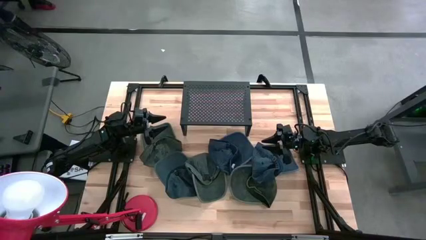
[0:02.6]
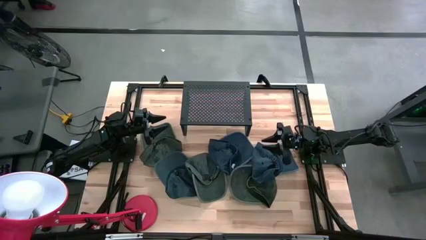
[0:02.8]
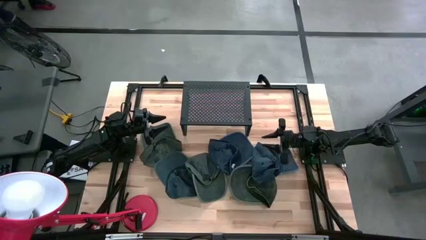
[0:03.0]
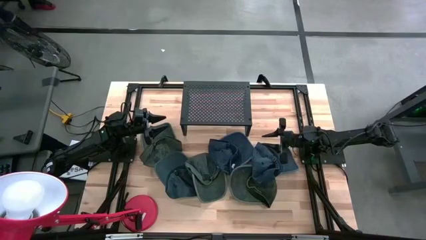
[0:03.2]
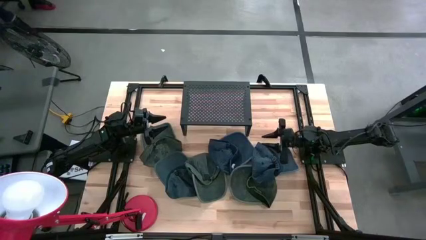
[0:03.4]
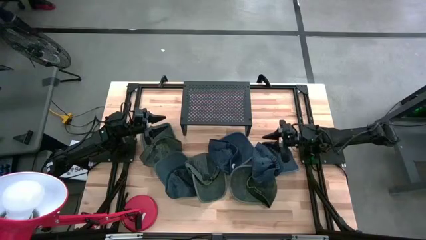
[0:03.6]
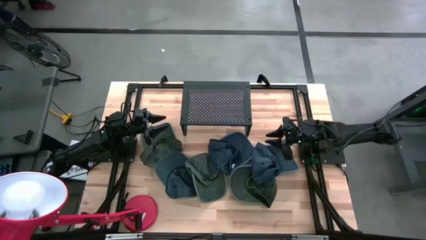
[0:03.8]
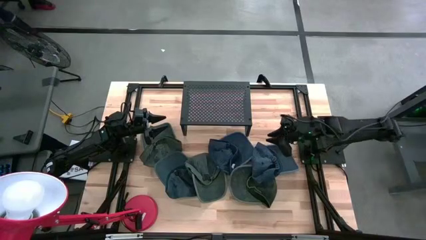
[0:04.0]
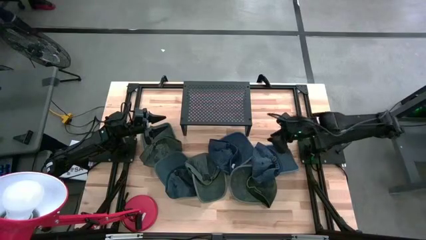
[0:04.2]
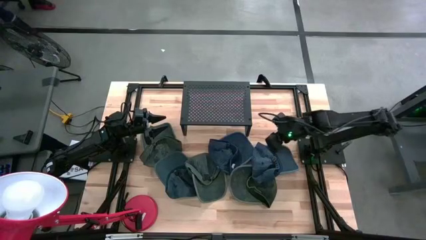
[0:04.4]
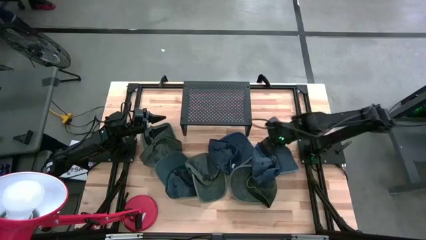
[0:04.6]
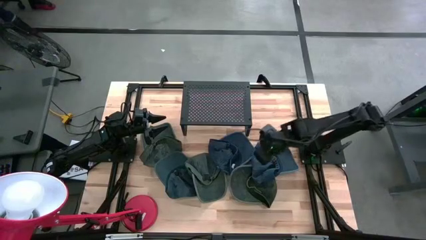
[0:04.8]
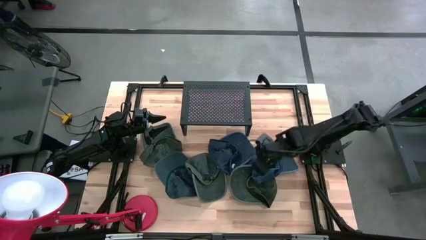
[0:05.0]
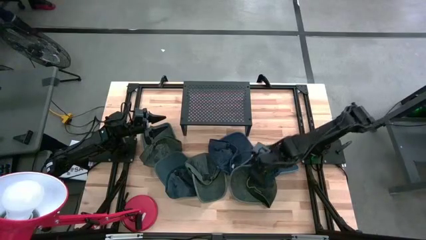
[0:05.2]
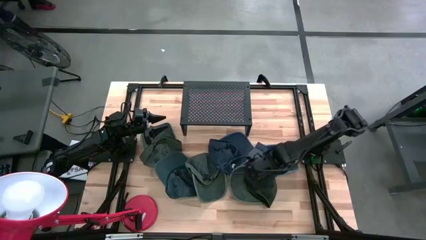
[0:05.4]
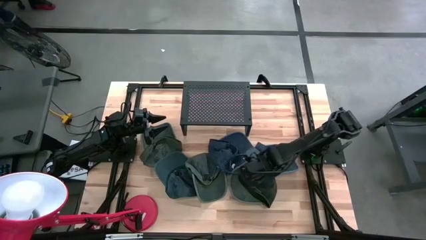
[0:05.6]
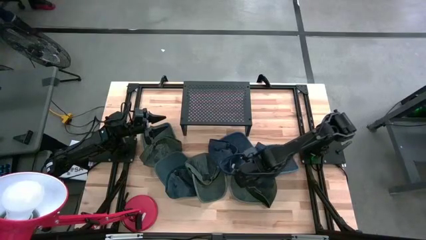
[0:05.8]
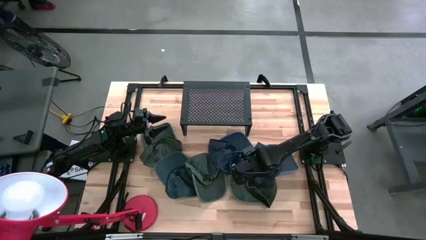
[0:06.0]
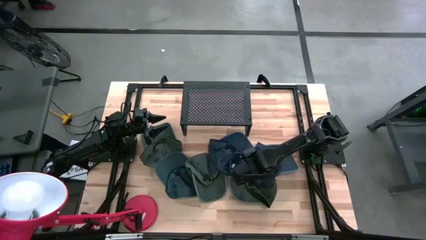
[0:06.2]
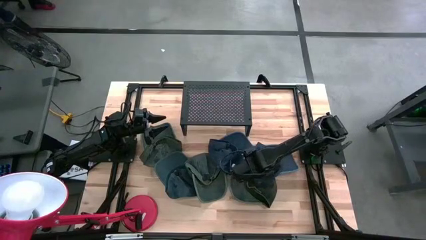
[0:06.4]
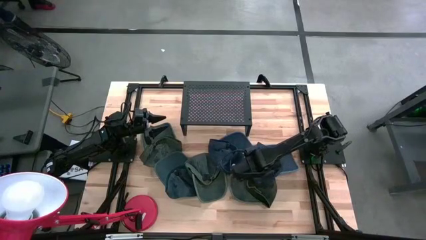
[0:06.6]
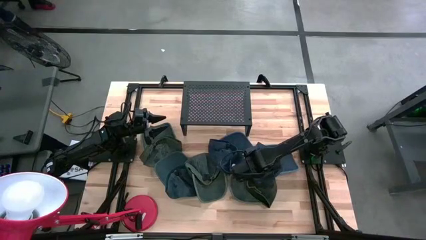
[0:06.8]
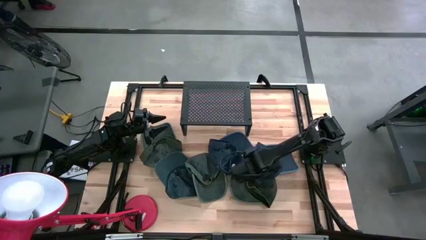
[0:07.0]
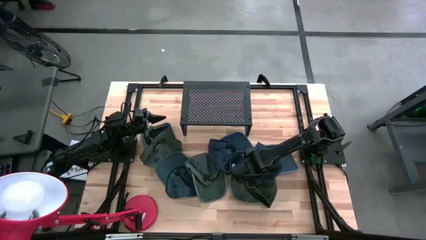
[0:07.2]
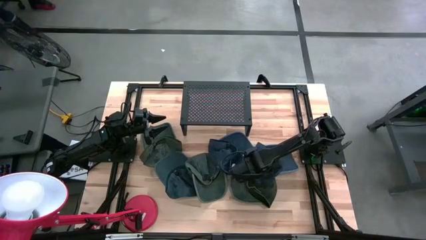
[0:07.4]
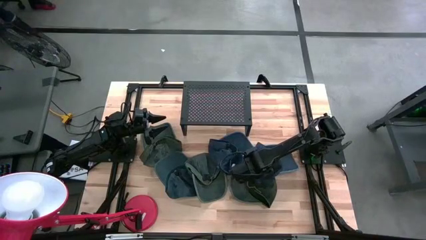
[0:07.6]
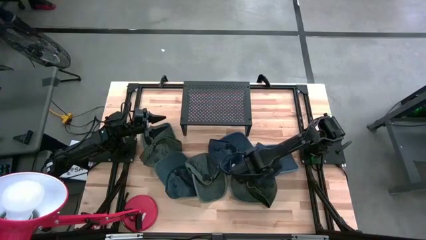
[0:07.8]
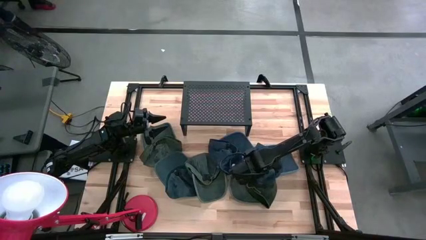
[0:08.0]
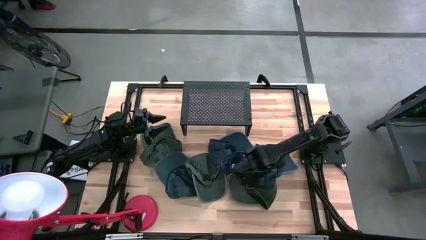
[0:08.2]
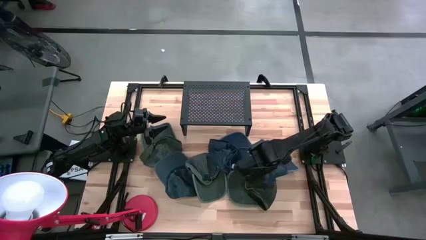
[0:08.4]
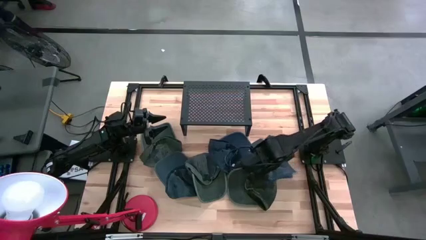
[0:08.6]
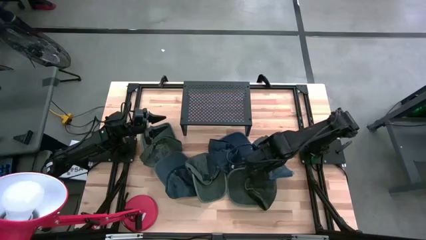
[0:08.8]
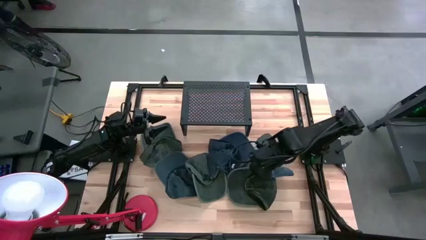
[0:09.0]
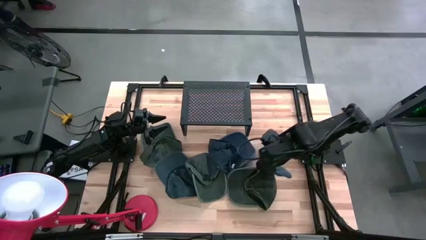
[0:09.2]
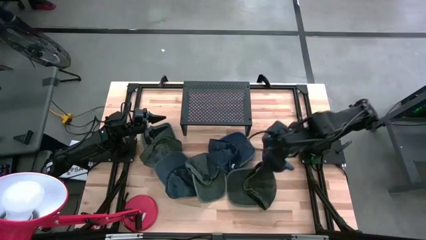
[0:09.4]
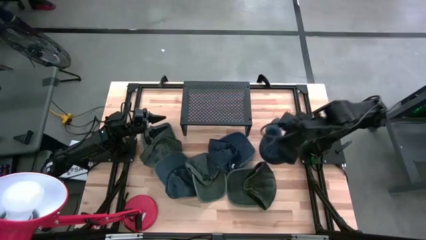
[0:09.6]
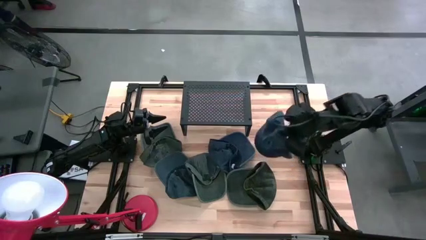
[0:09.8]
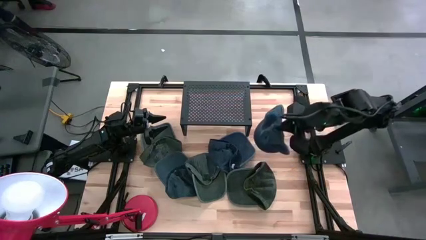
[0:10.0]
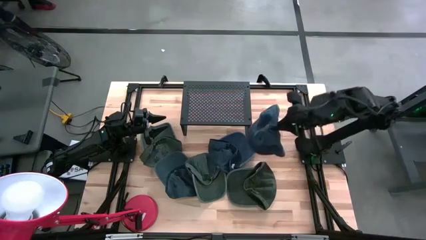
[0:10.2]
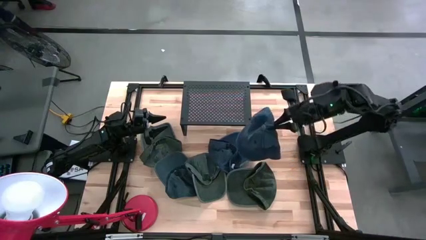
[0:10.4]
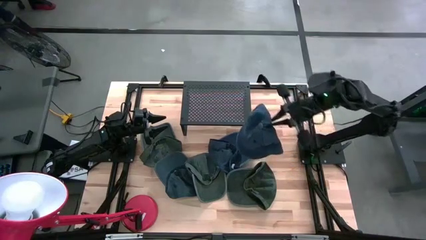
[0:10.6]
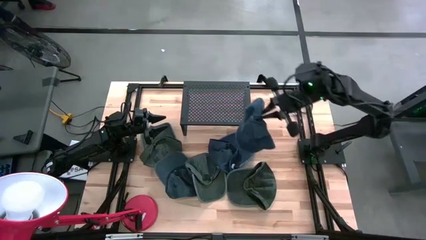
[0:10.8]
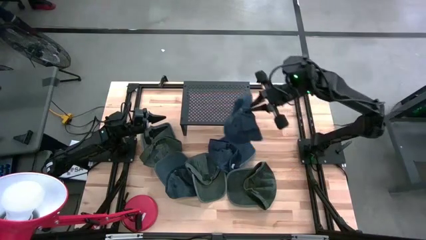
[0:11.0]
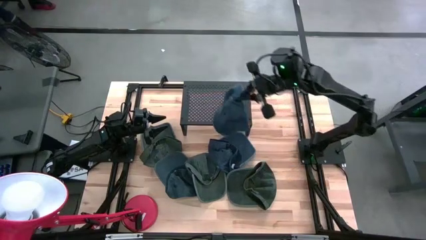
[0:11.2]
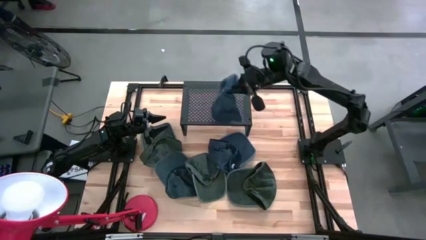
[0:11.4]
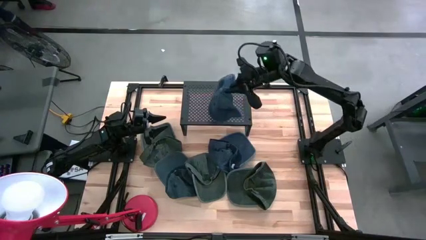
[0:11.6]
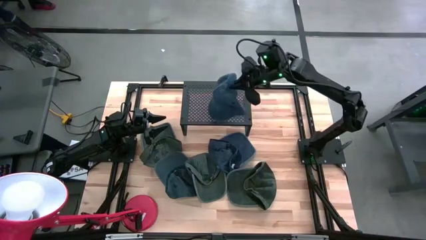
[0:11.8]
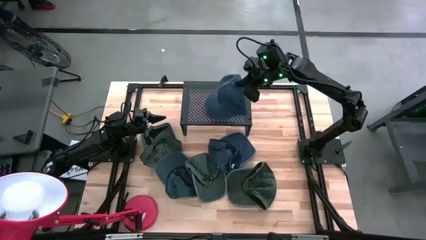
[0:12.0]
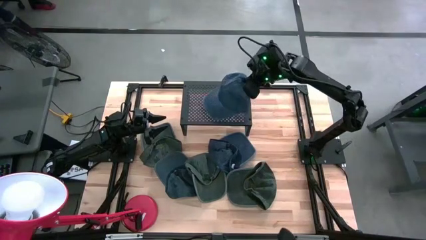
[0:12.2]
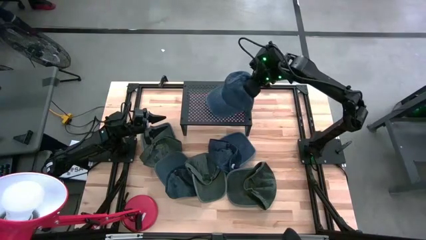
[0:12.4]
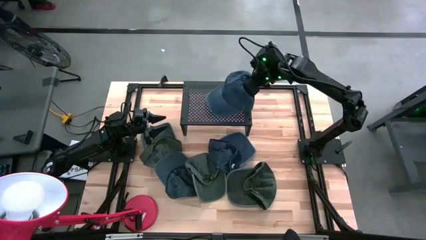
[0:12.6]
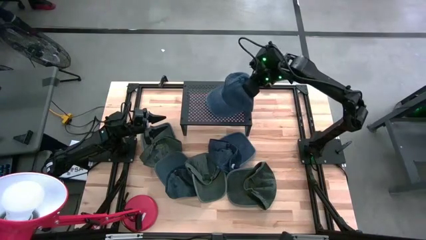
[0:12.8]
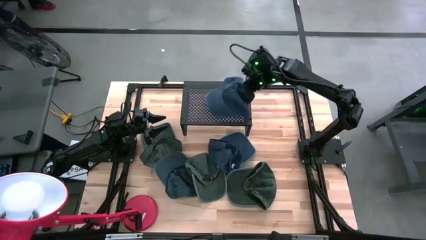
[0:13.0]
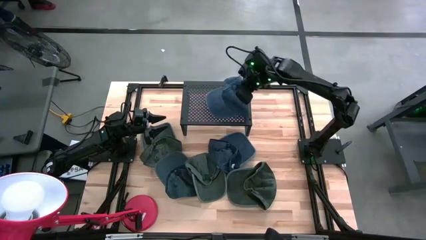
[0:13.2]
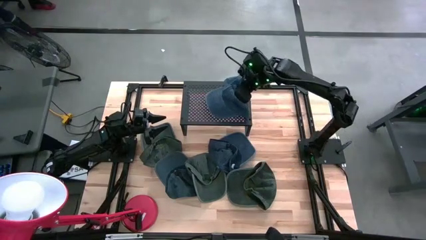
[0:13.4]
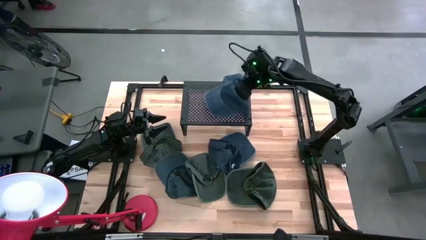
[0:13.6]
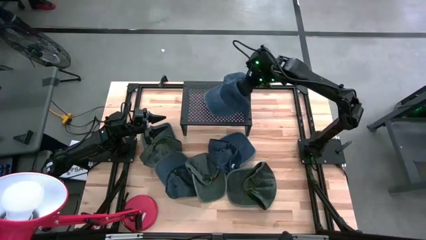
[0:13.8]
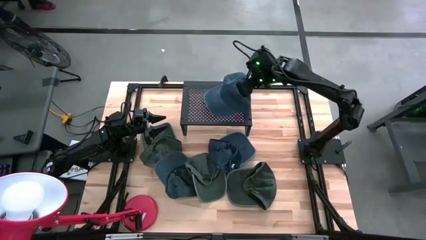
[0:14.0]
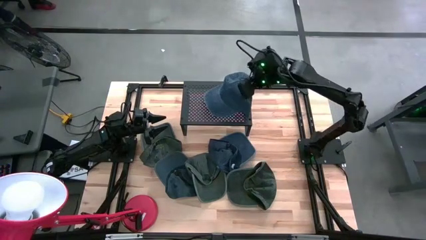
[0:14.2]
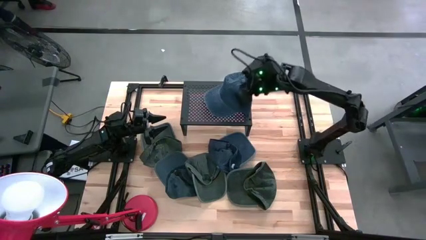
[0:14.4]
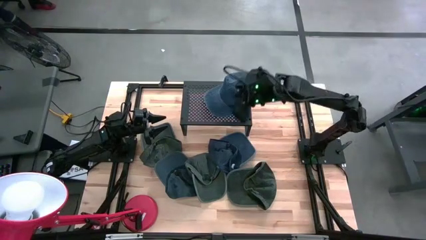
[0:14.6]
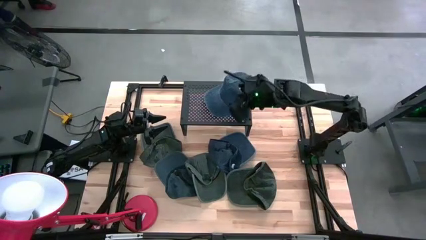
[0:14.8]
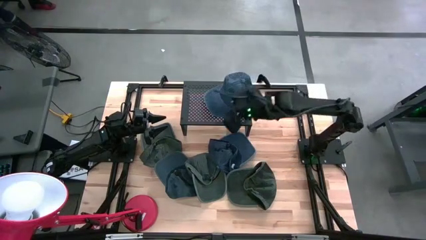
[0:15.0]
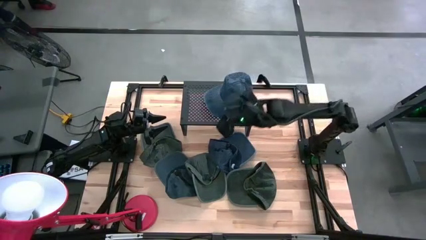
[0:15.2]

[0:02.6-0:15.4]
Task: Pick & Place hat
Stack the dark blue cap on the shelf
